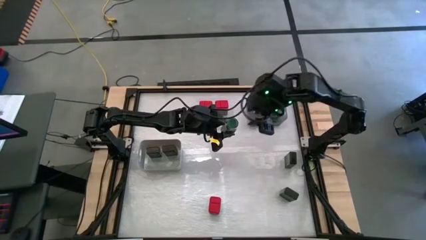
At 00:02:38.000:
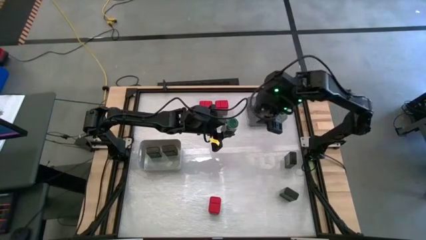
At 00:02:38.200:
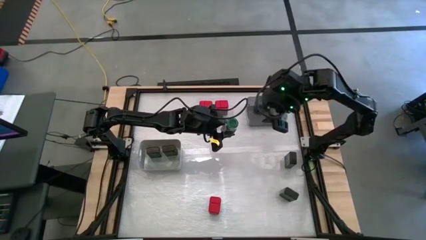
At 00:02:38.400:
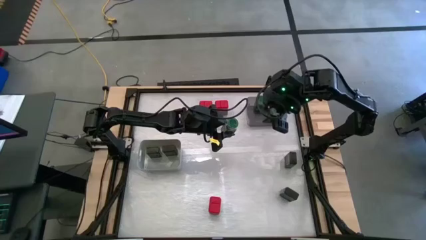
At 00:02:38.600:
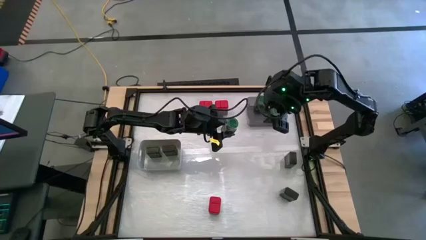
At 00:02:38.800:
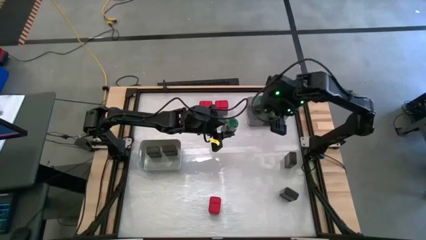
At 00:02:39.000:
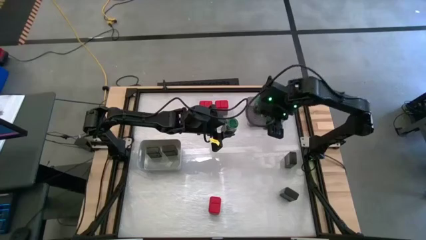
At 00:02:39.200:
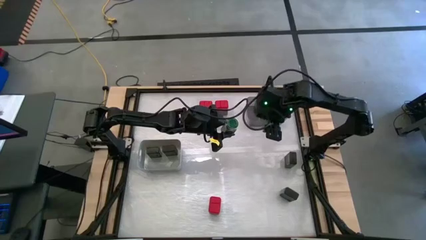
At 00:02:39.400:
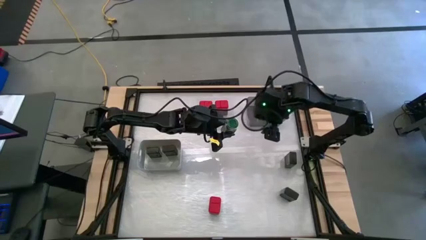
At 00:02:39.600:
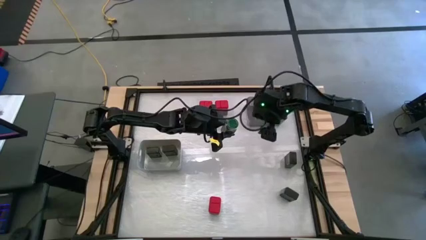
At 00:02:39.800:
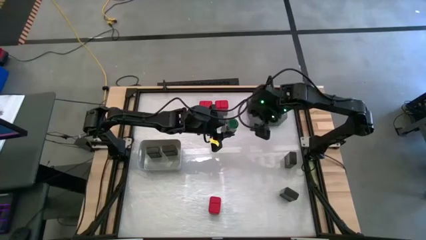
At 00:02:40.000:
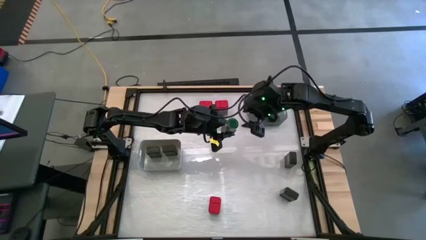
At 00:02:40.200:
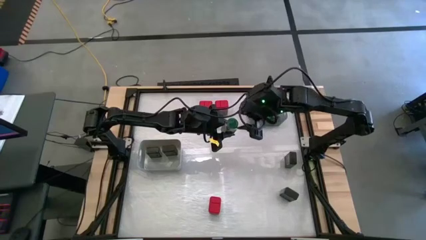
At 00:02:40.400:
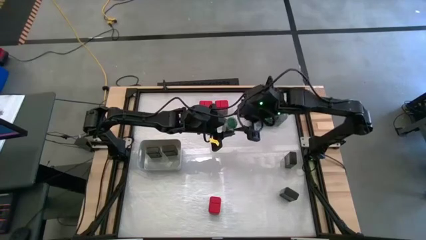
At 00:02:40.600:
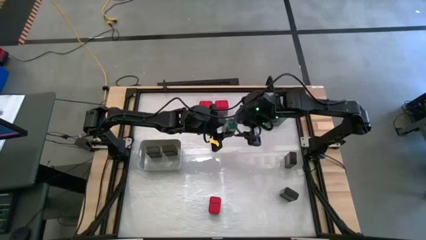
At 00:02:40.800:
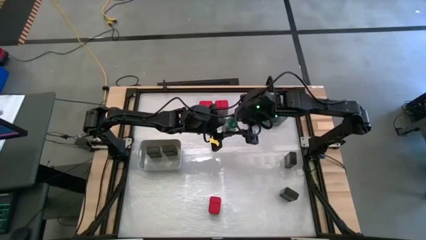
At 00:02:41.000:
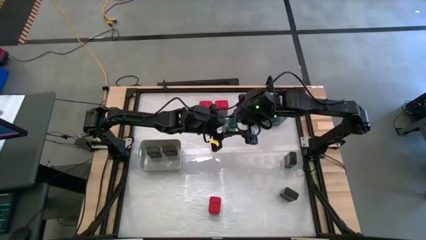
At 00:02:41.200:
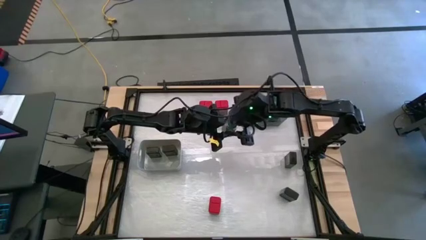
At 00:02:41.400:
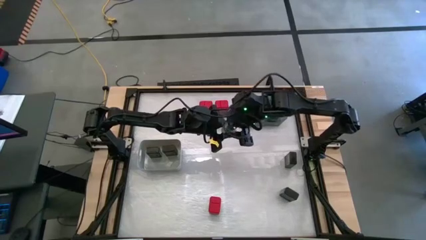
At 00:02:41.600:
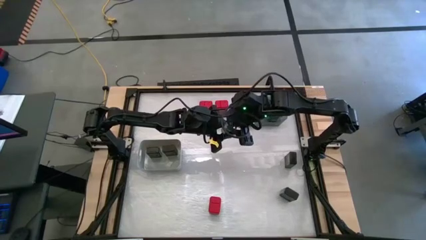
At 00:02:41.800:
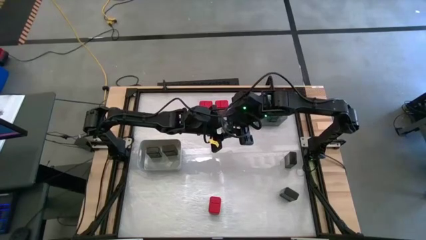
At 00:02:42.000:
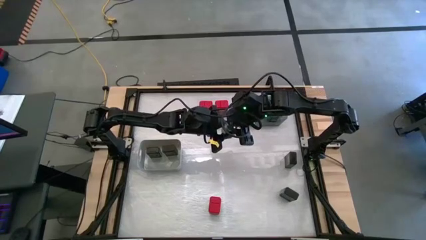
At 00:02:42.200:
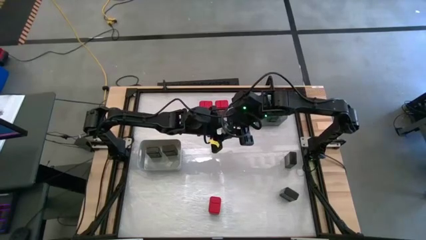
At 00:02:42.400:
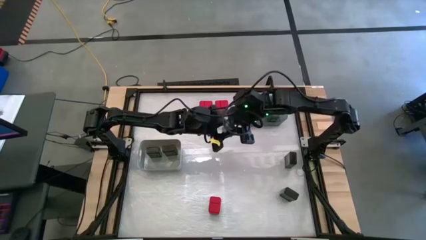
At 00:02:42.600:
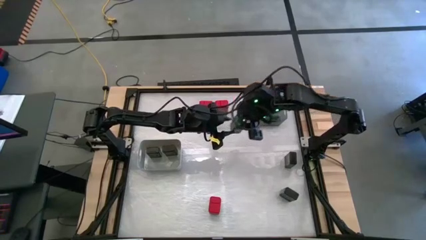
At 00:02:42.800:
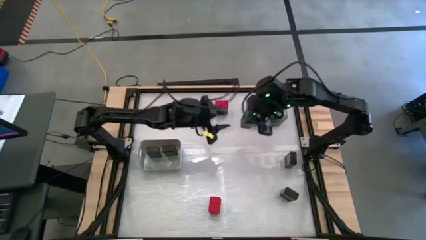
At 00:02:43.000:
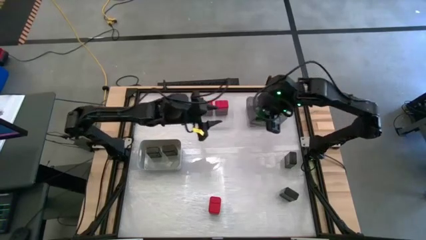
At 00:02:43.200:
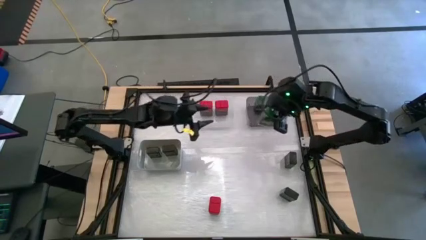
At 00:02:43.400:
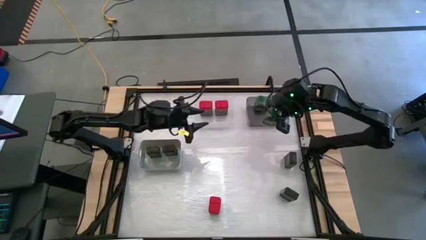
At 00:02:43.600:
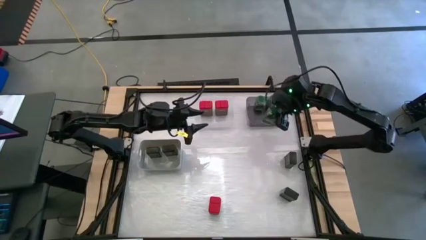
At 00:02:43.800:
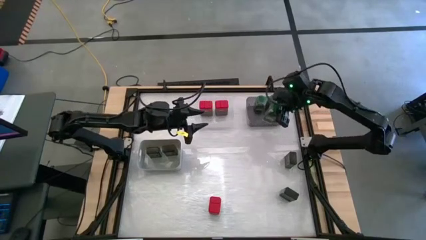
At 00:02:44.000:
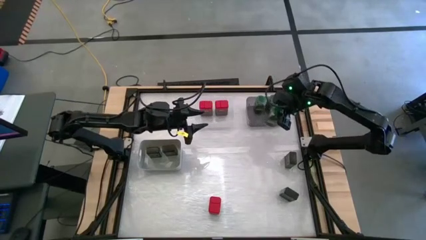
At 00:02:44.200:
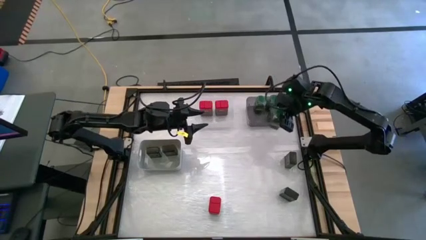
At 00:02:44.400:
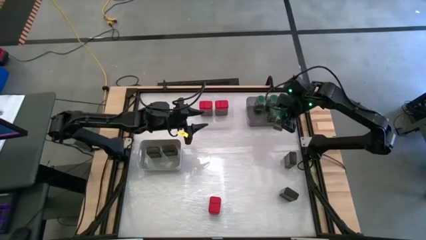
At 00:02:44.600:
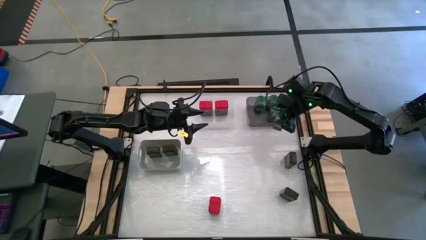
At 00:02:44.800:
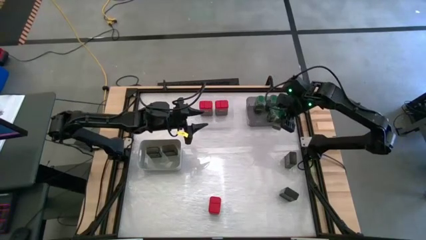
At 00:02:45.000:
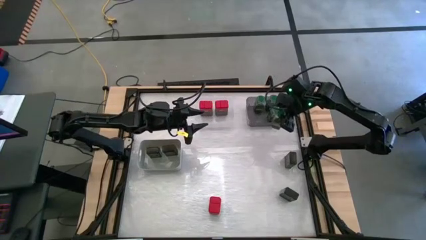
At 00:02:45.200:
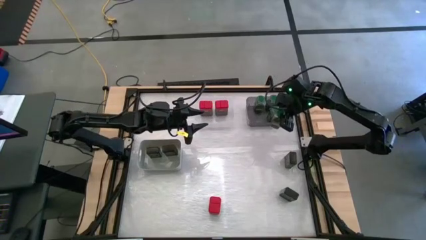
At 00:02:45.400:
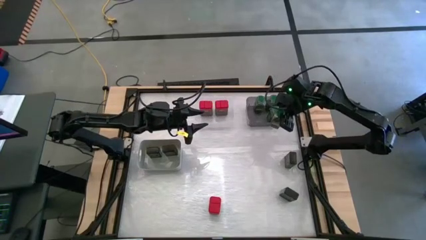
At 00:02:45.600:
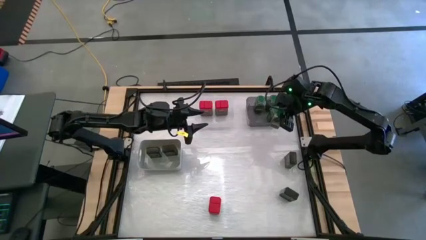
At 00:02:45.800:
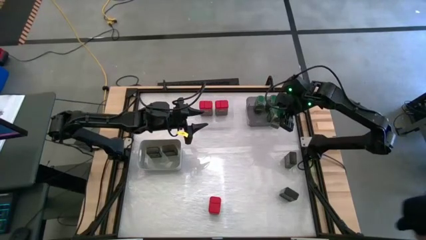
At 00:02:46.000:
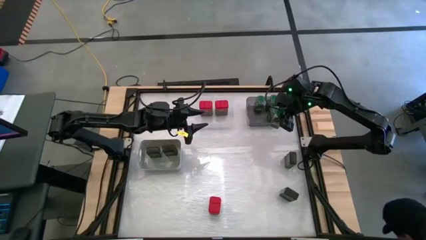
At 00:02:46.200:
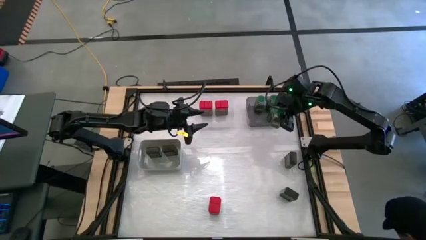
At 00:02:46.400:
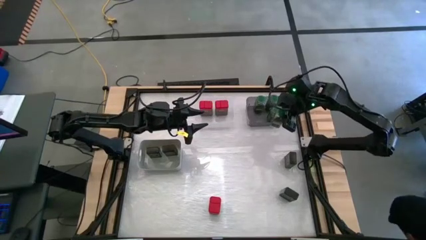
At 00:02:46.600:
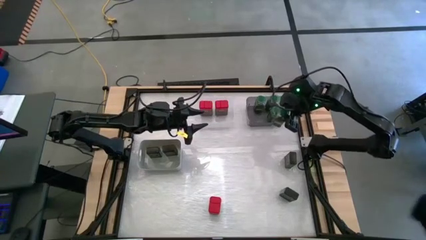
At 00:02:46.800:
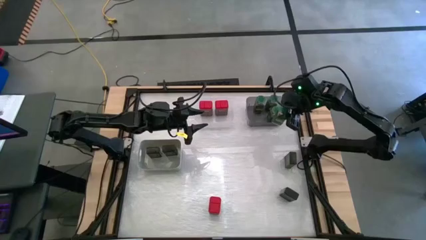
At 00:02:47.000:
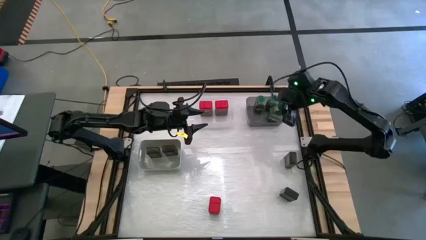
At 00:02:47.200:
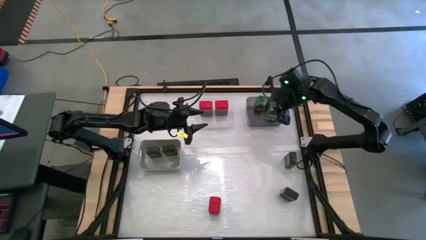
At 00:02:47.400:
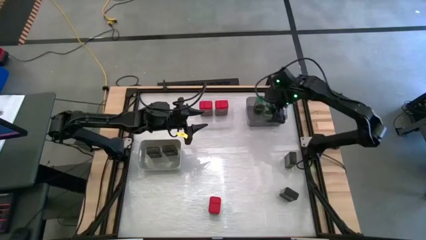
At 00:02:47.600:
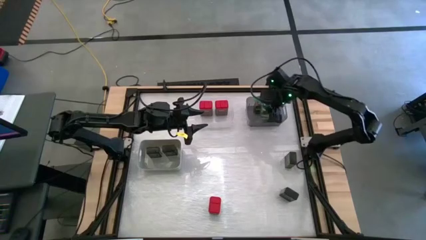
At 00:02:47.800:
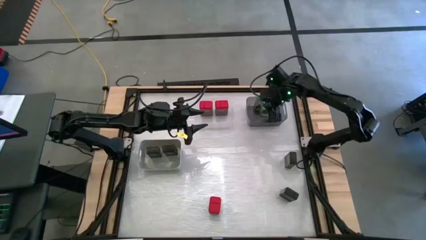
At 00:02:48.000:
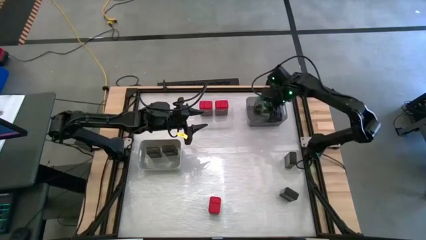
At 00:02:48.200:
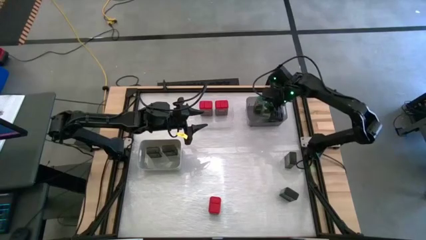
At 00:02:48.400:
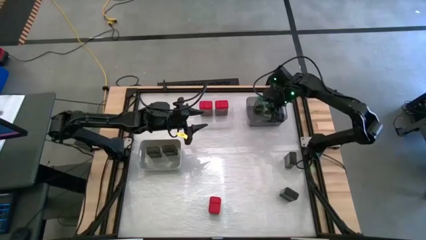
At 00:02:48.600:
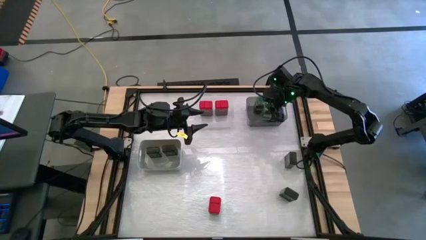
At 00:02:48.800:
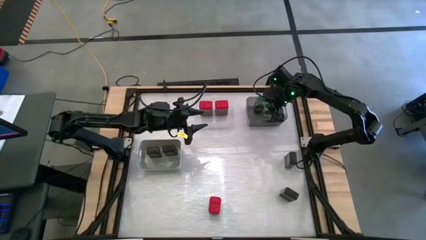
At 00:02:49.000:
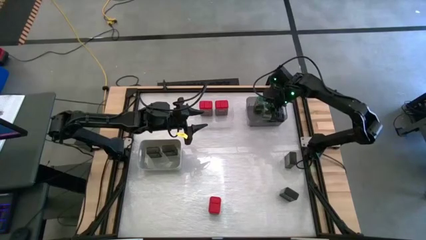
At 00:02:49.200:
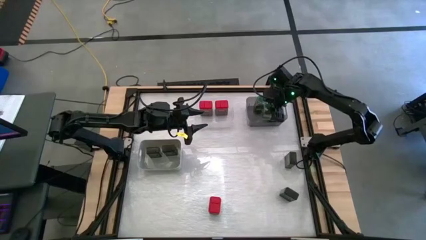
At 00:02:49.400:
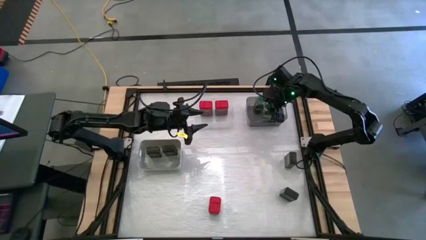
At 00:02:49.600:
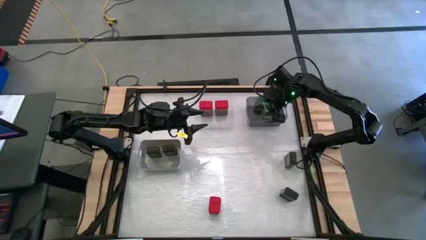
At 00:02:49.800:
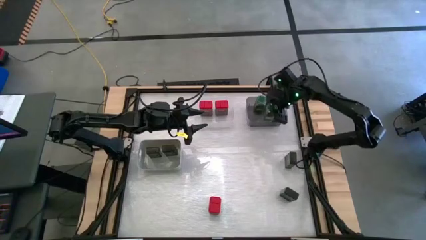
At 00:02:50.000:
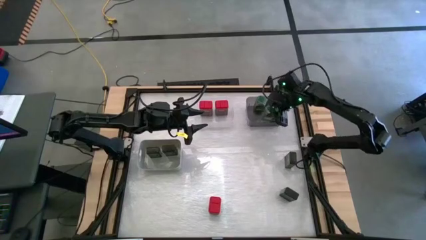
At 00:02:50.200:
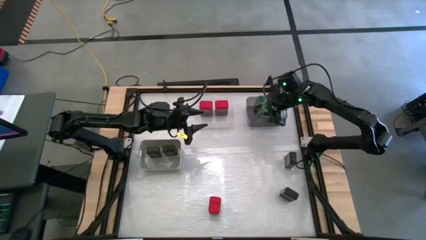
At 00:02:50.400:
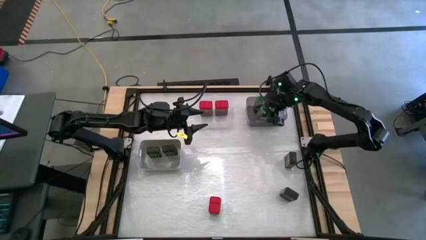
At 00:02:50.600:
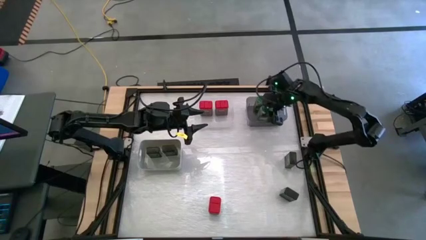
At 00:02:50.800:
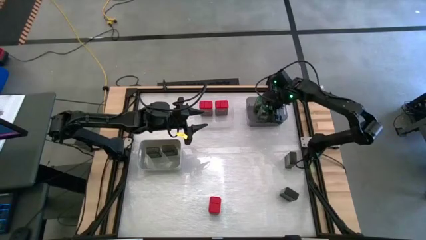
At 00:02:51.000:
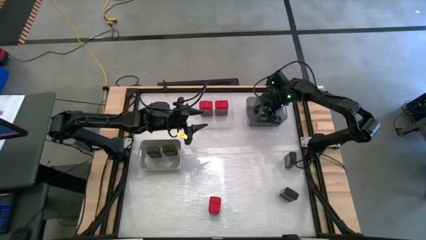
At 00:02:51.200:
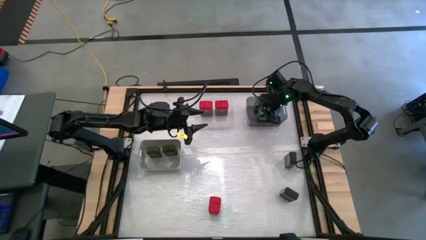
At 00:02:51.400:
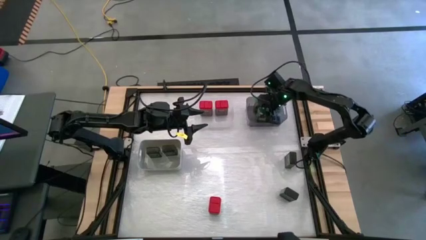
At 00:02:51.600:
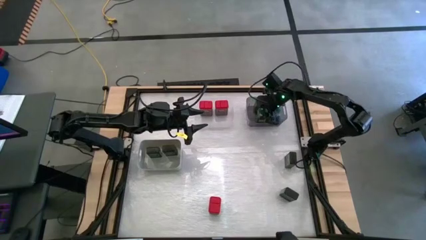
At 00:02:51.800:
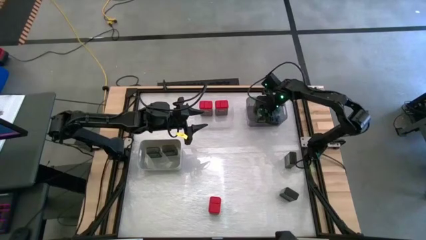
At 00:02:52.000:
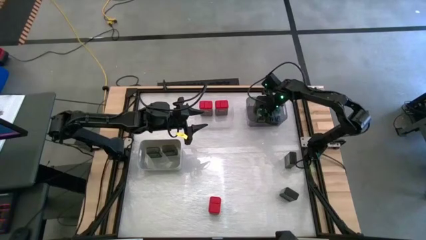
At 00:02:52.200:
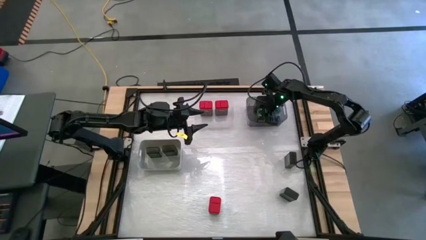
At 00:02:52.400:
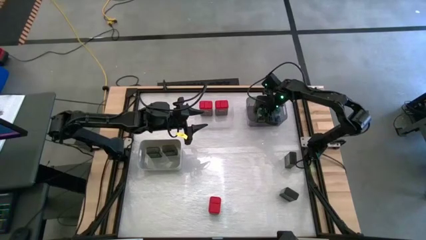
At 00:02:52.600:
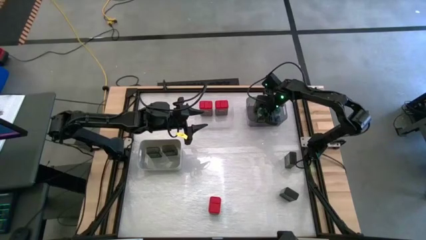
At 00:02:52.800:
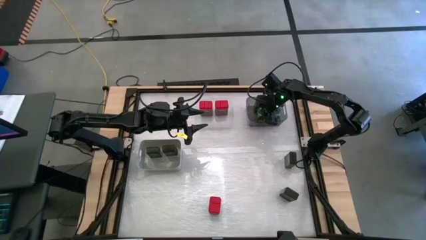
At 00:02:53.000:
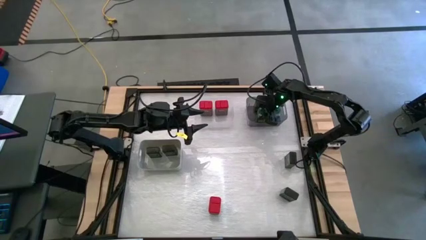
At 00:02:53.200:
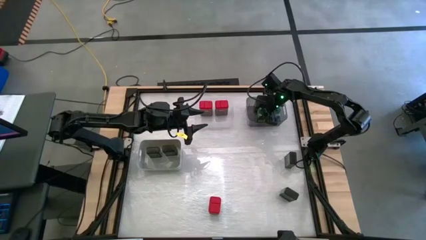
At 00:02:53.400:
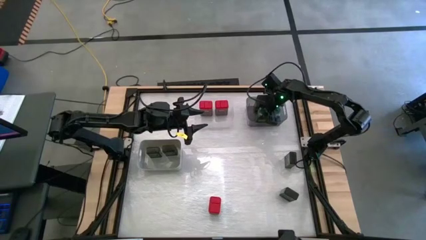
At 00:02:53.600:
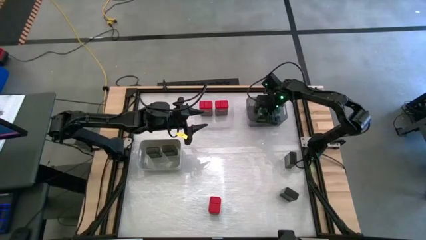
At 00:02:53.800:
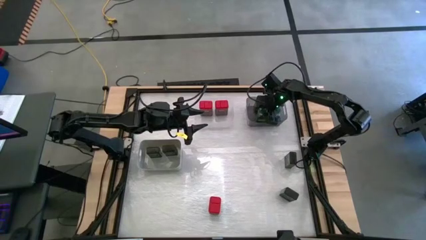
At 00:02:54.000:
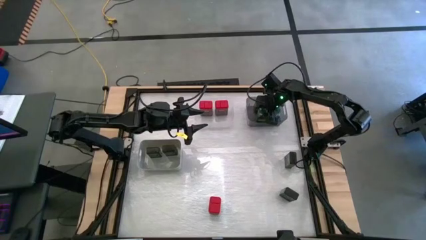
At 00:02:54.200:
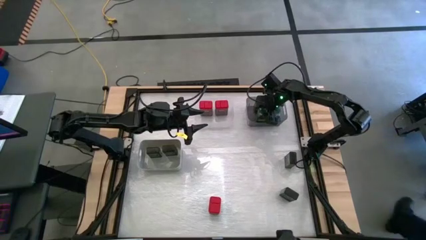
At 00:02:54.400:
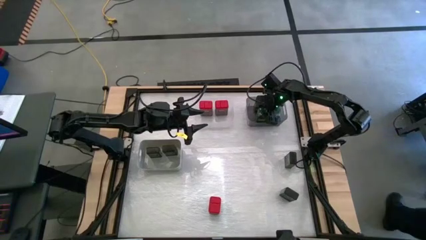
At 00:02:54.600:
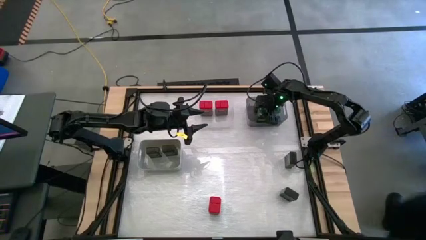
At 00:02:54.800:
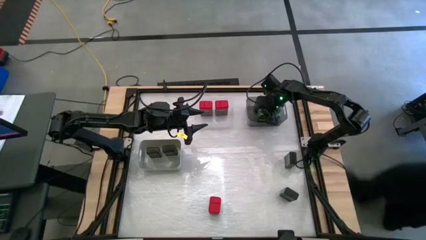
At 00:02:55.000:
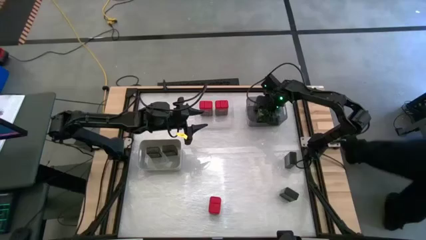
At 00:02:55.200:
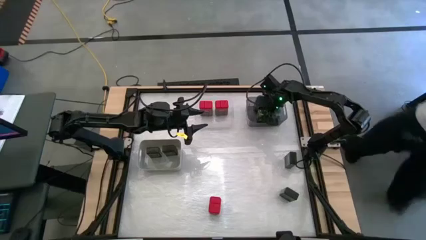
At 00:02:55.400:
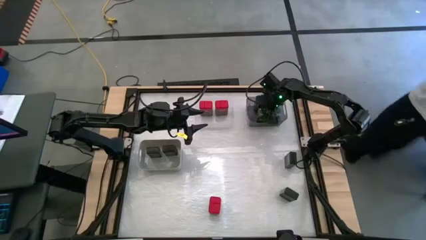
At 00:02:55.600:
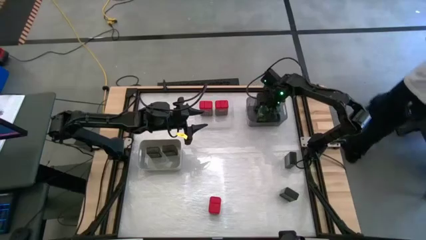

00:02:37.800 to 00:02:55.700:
Task: Sort spices by type
Put the green seasoning bottle into the black bin
